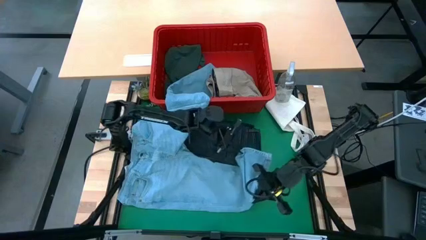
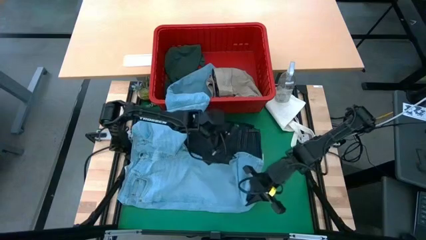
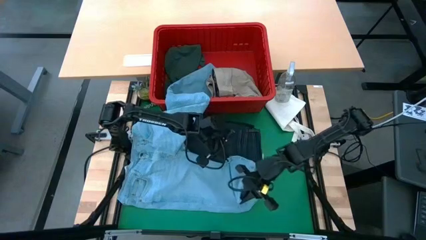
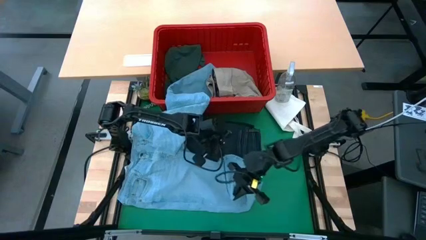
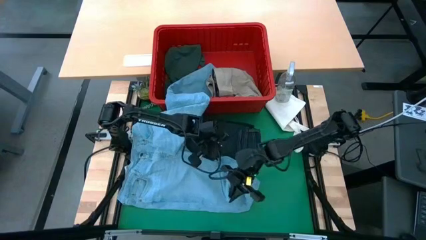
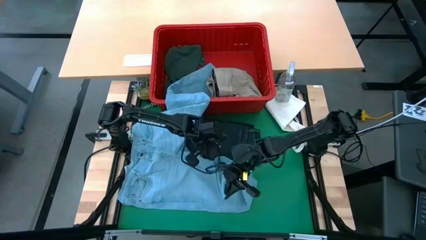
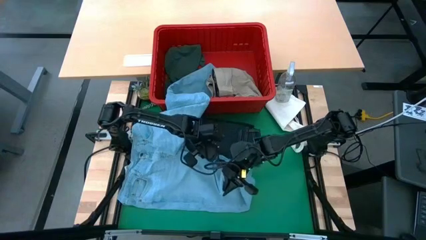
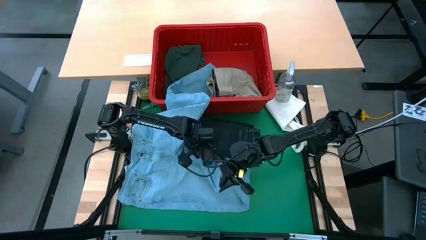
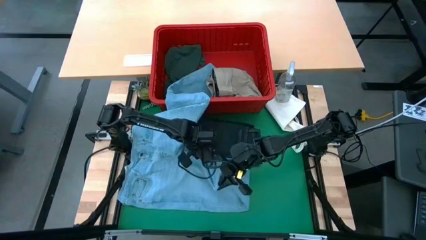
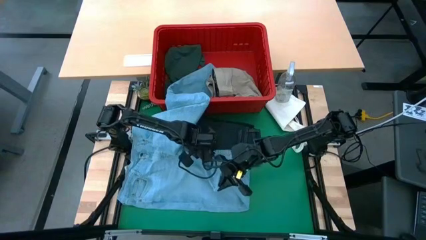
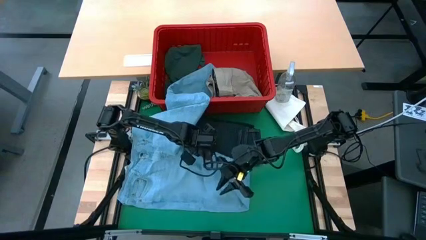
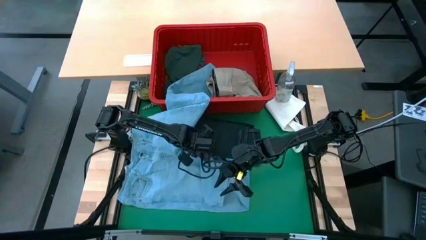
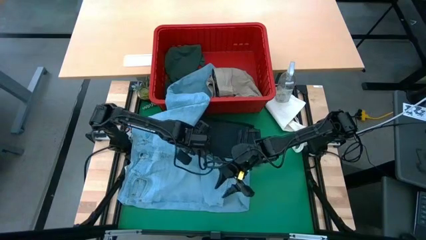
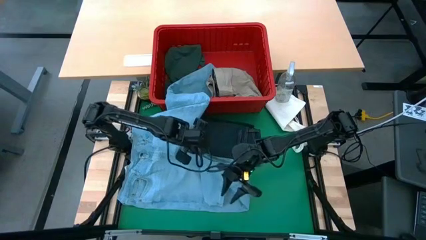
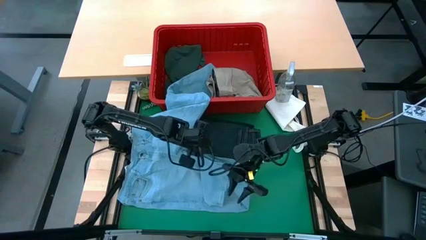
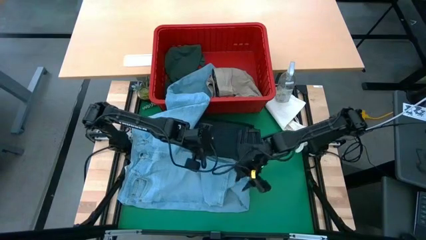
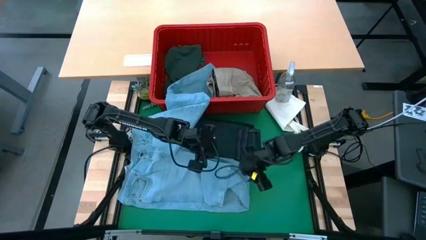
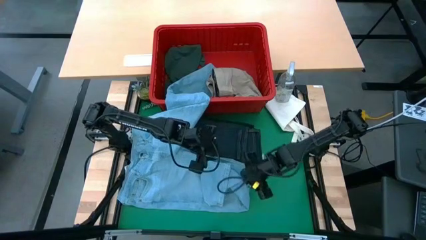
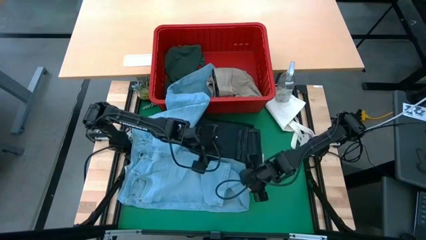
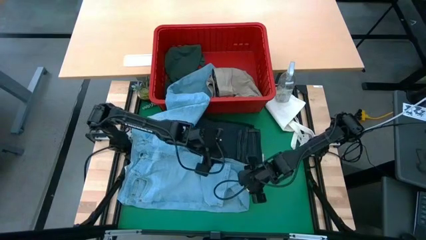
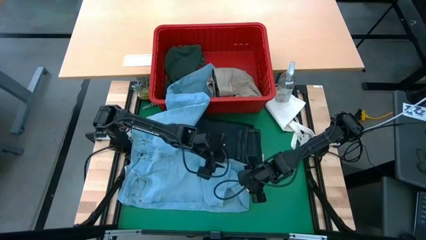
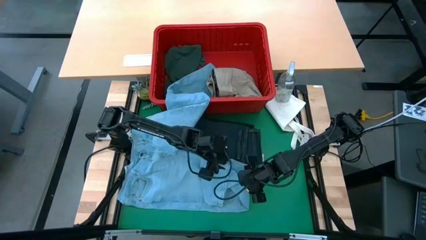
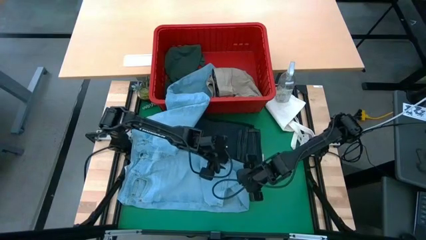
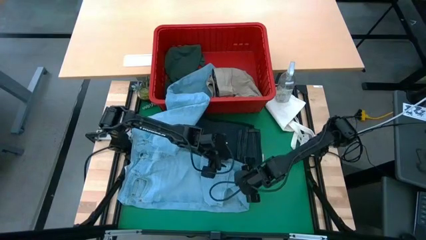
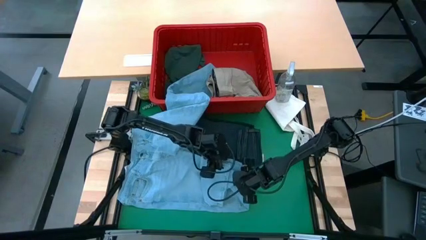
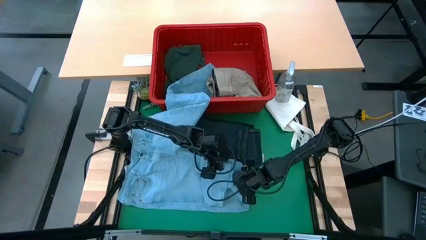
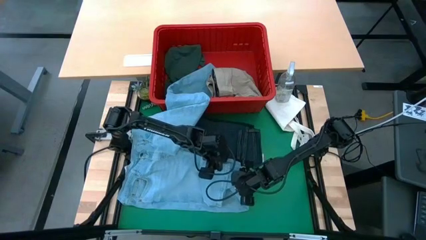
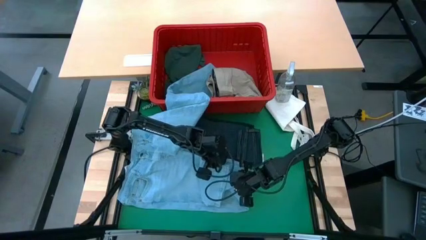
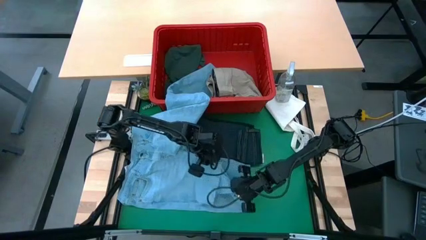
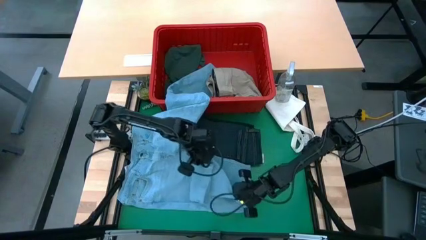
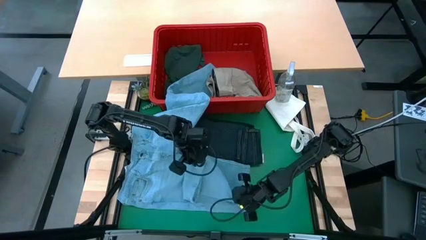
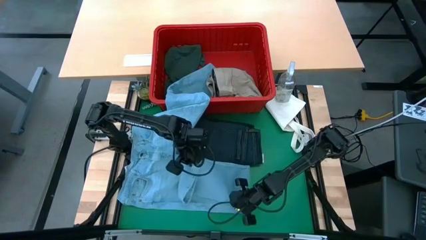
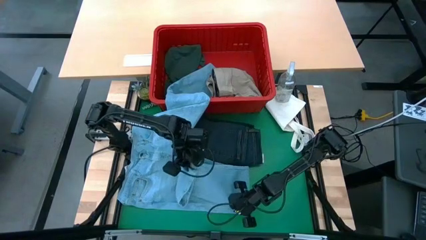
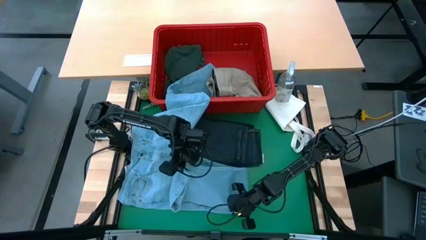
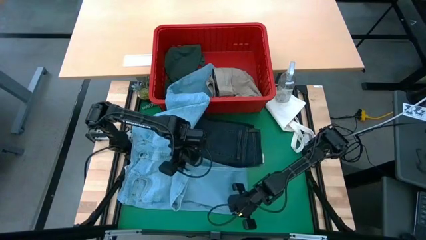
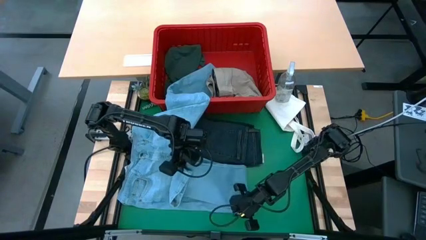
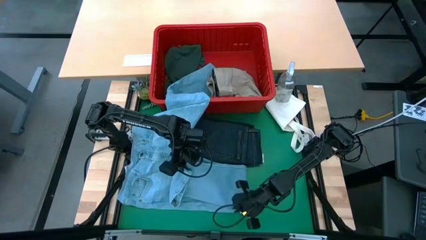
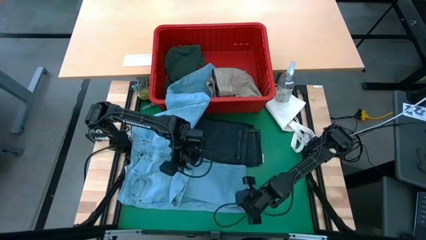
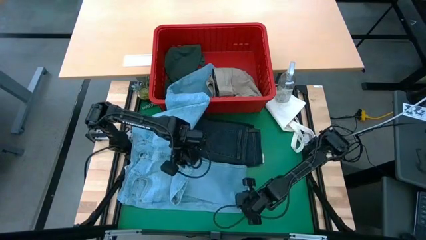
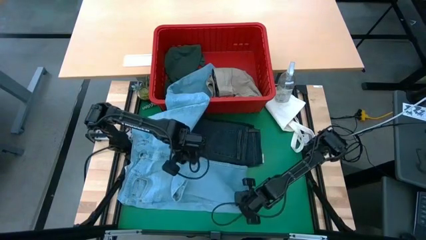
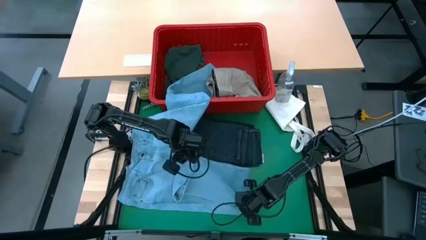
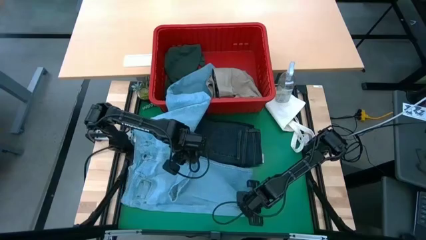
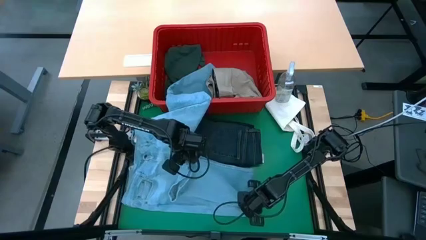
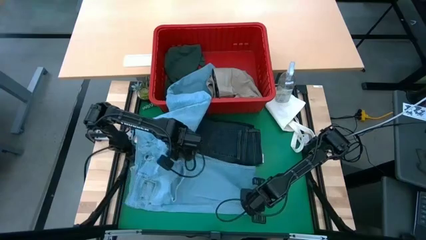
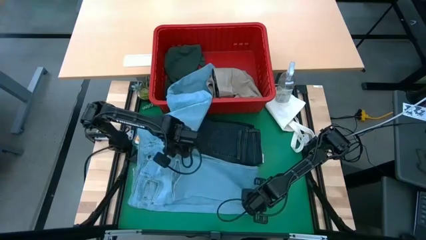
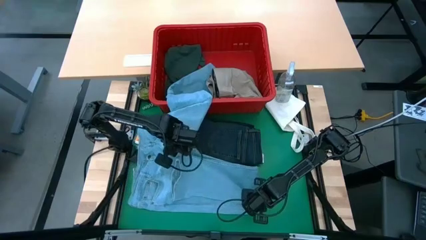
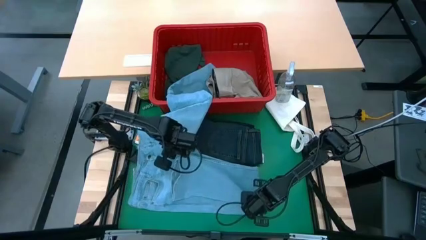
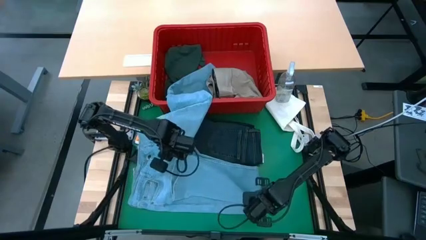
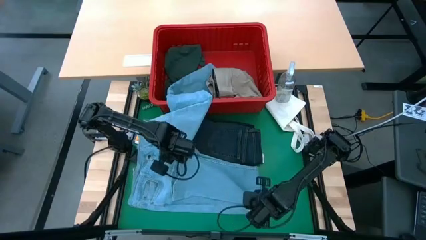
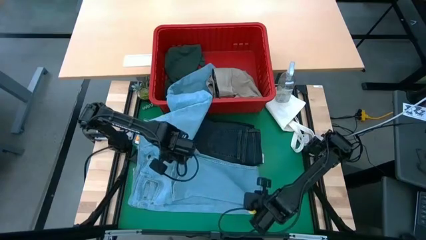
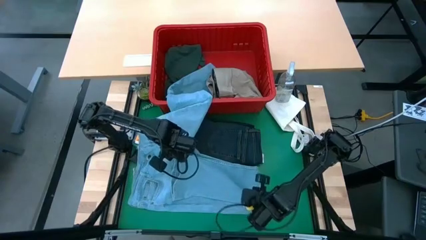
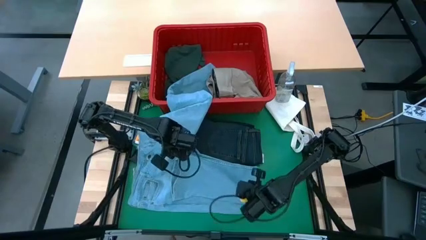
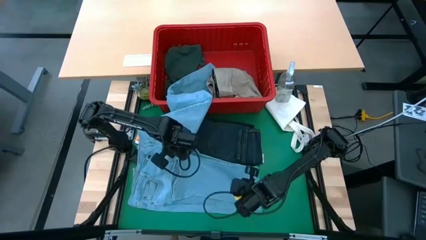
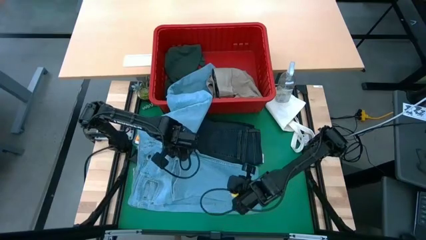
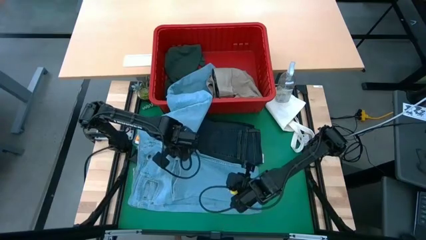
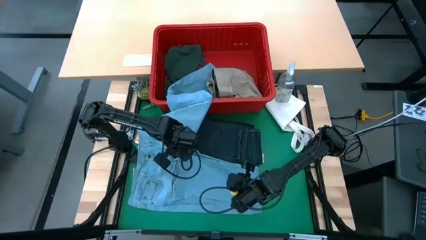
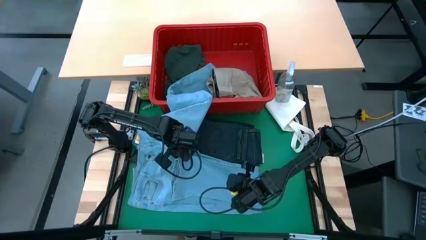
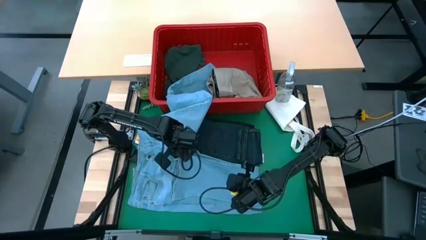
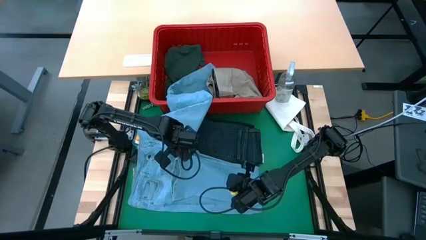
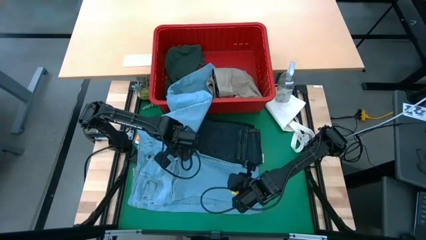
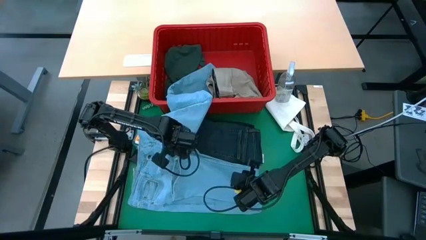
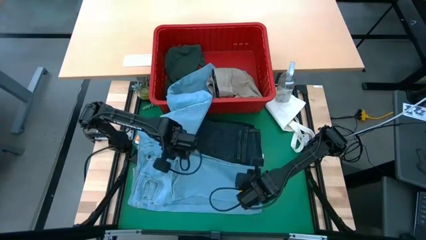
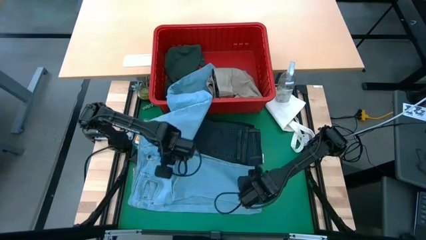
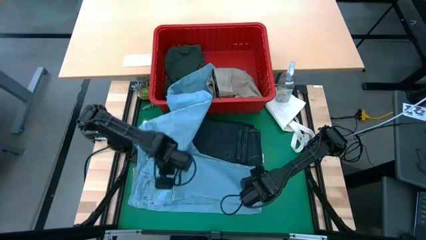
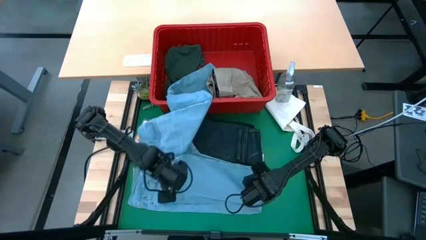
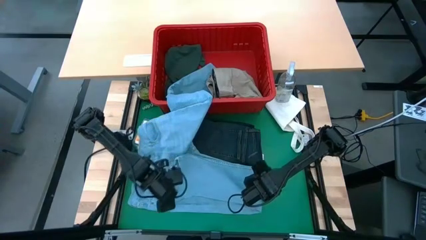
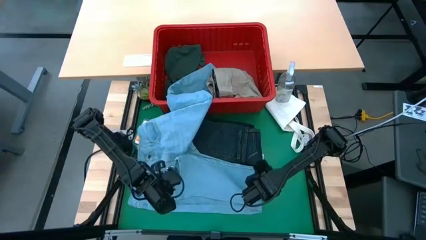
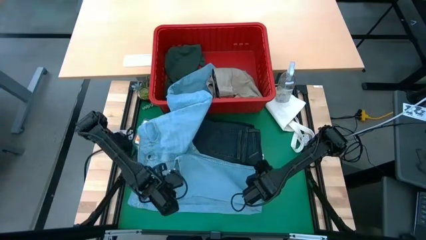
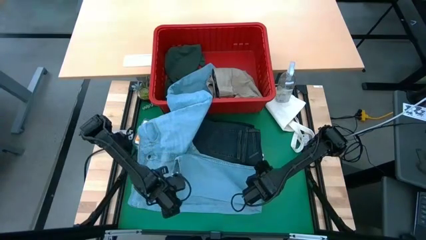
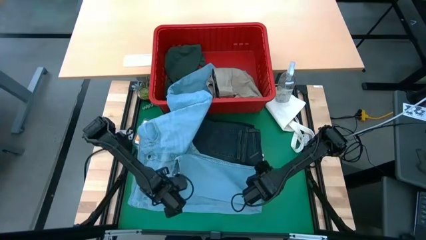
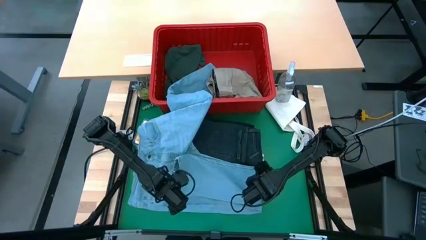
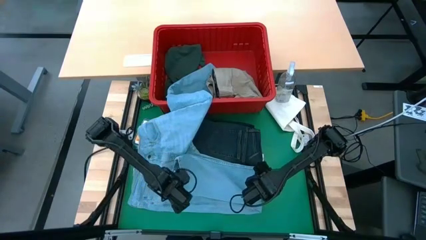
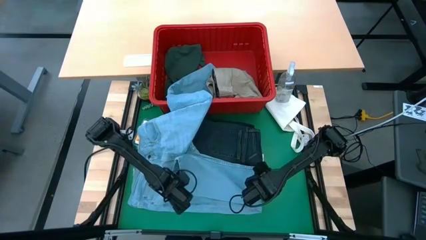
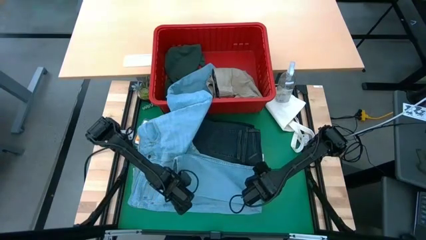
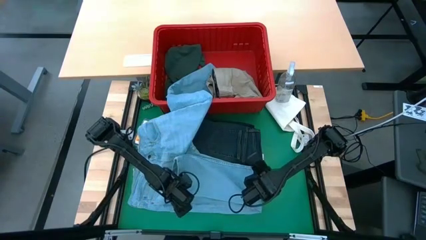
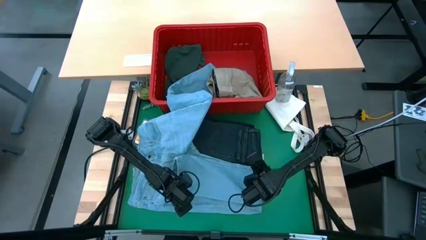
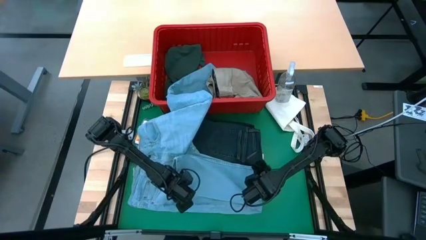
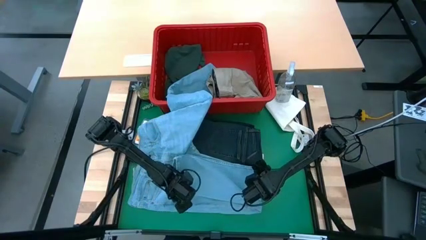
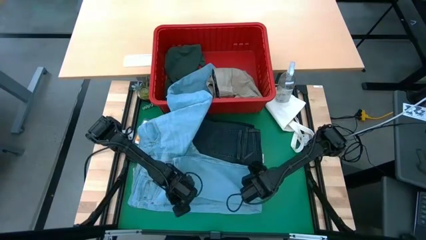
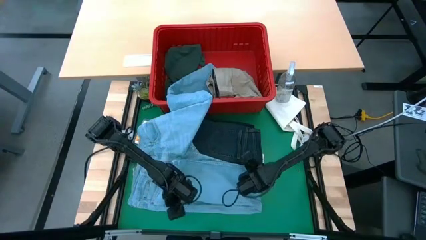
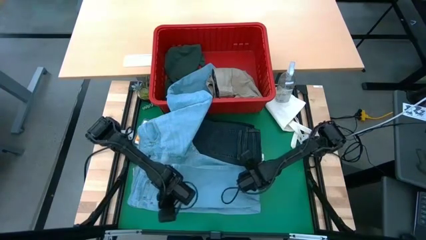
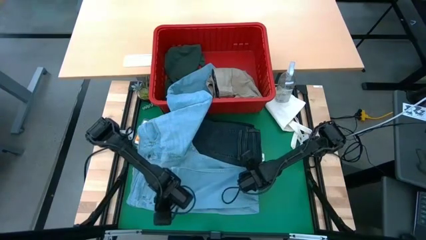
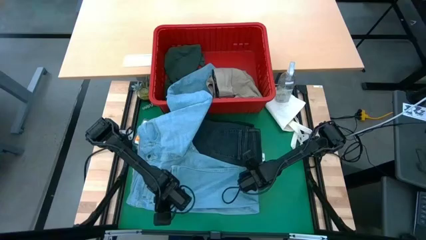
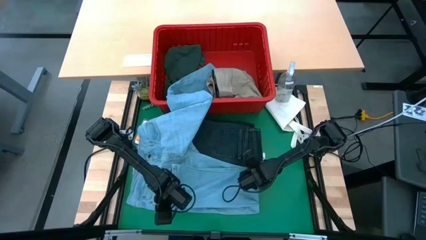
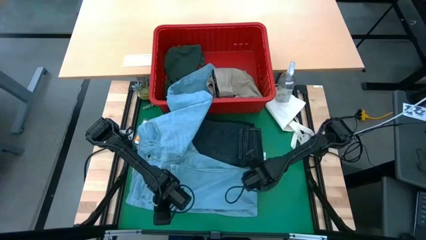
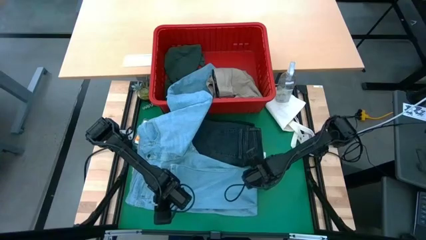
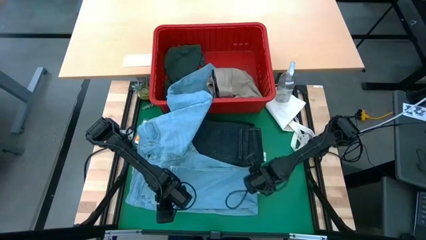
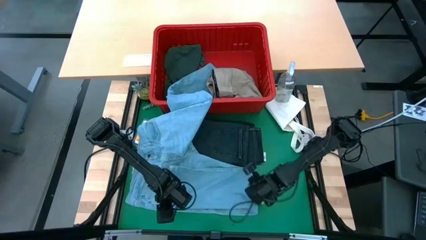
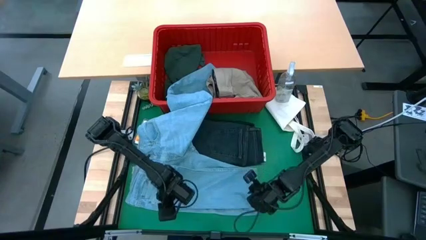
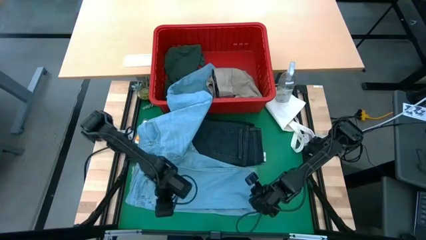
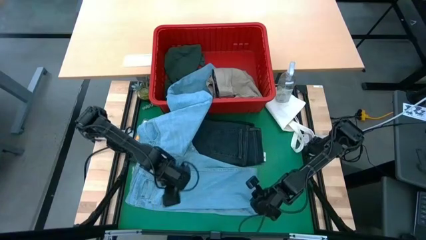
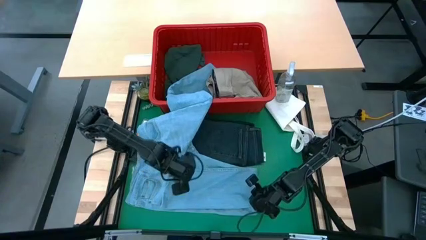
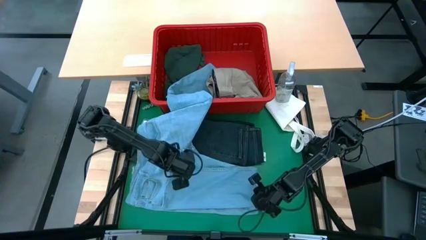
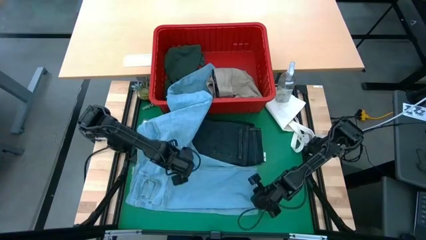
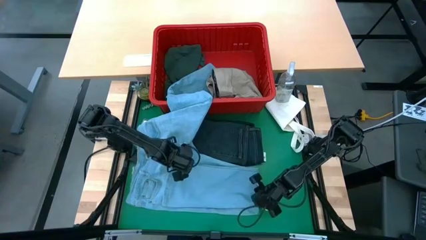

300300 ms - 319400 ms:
Task: Fold laundry
Fold the light blue jeans
